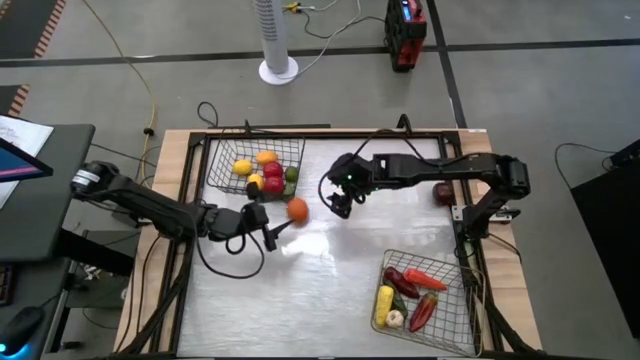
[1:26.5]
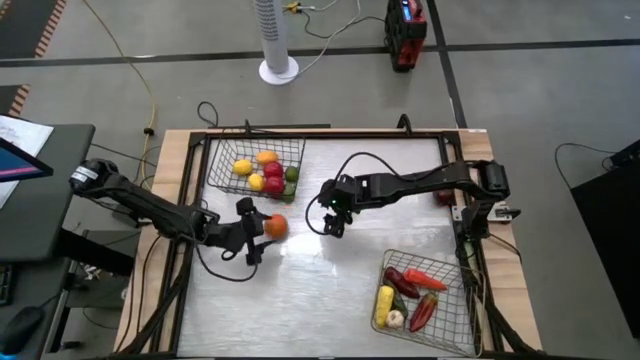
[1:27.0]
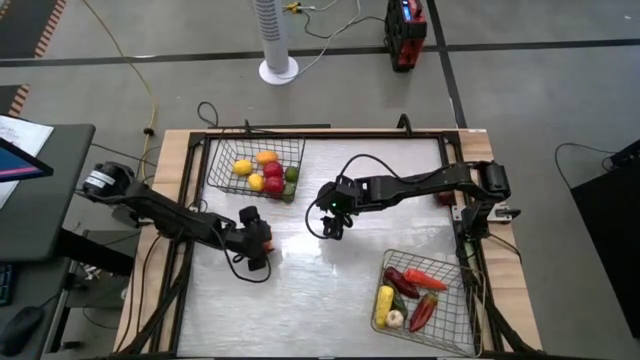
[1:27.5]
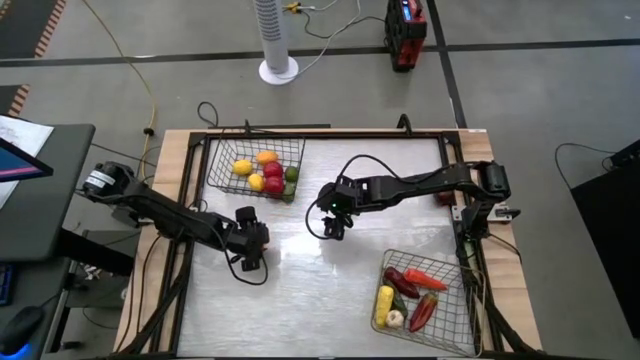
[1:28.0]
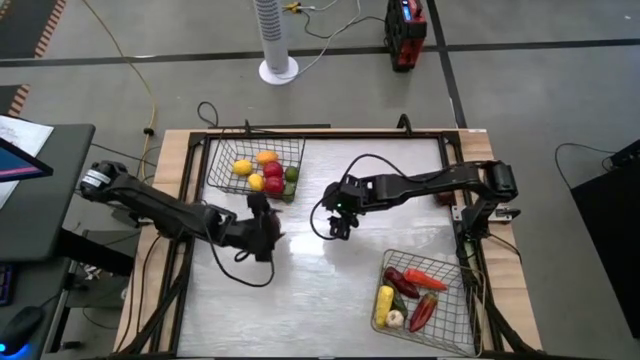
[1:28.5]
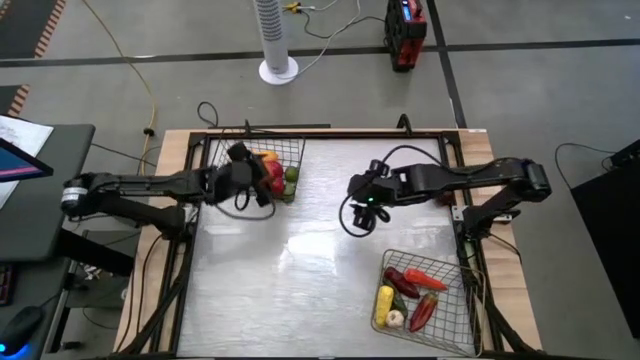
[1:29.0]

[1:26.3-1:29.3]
Task: Sort produce into baskets
Put the orange into the black wire basket

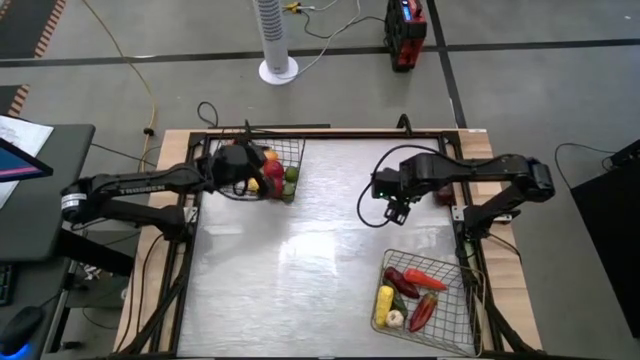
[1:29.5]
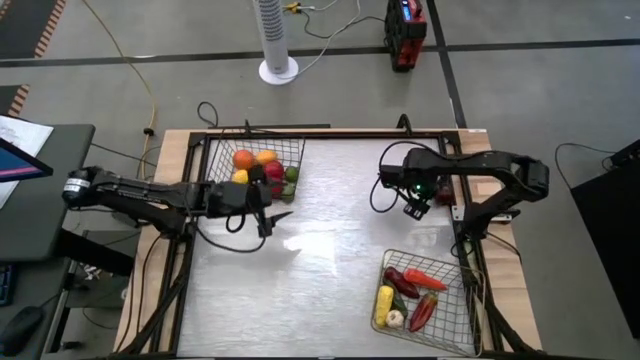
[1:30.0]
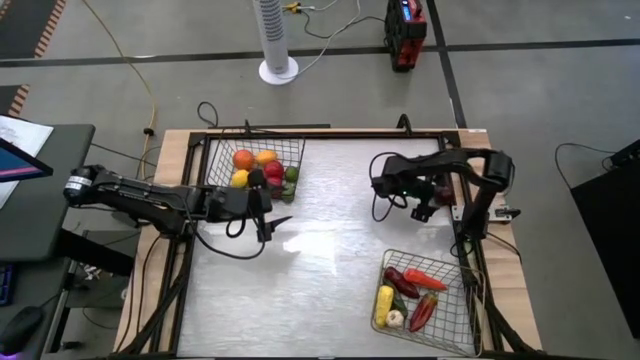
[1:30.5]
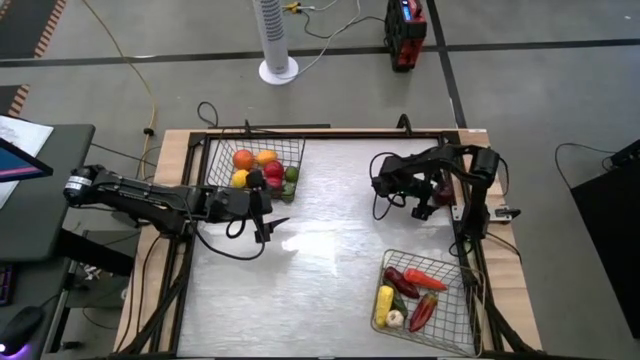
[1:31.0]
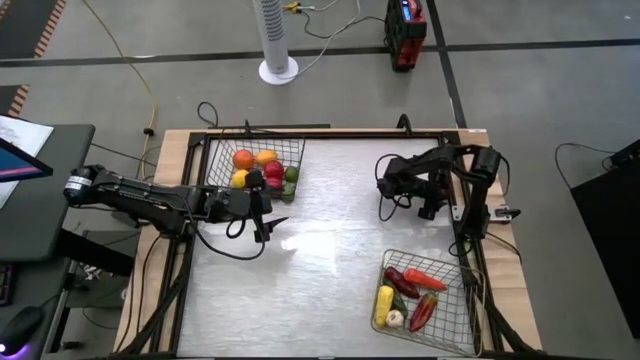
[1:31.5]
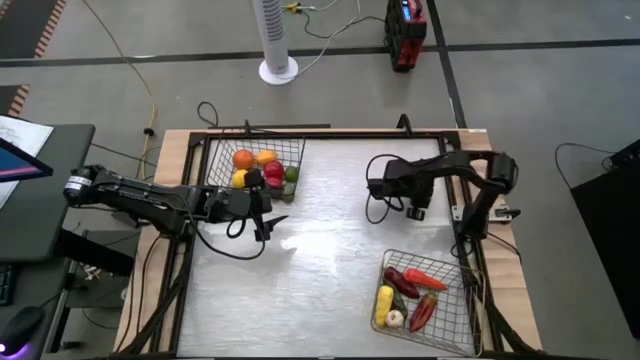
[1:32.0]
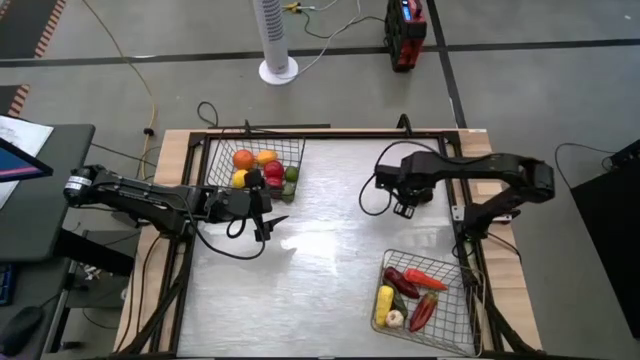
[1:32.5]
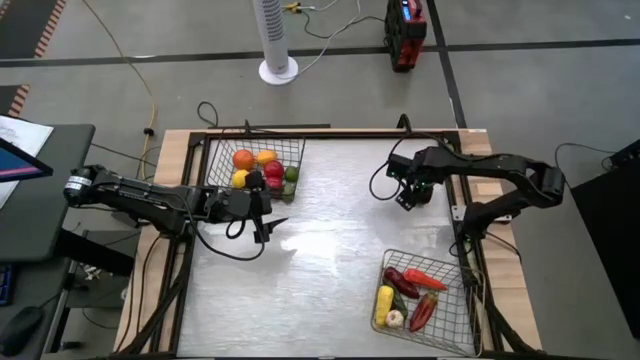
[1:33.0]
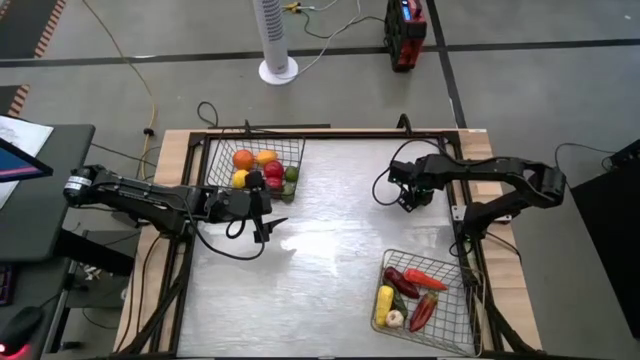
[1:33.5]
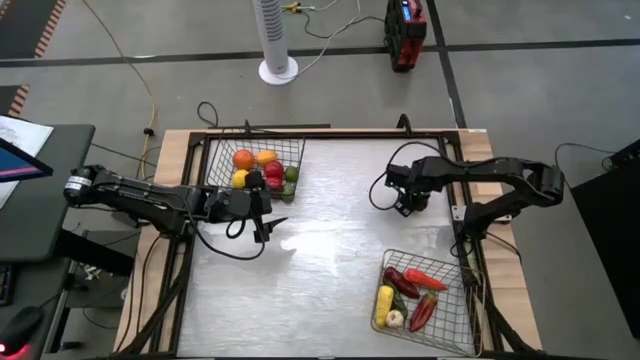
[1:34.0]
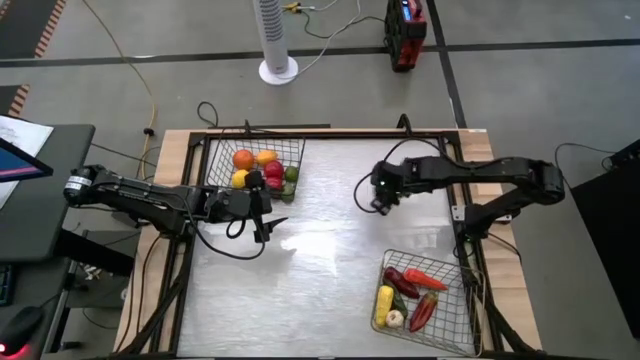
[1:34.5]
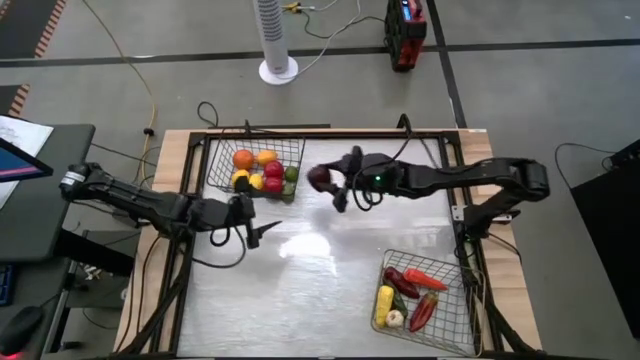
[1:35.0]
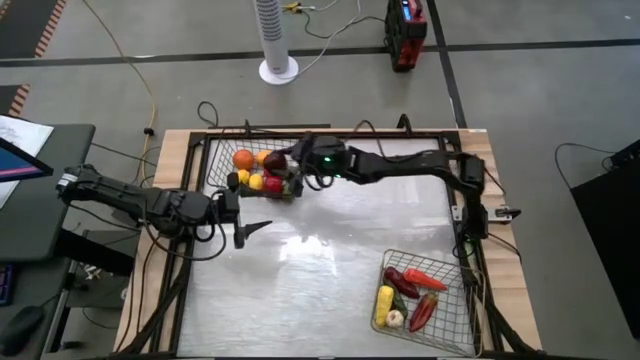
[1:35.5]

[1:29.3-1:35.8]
Put the red apple into the black wire basket

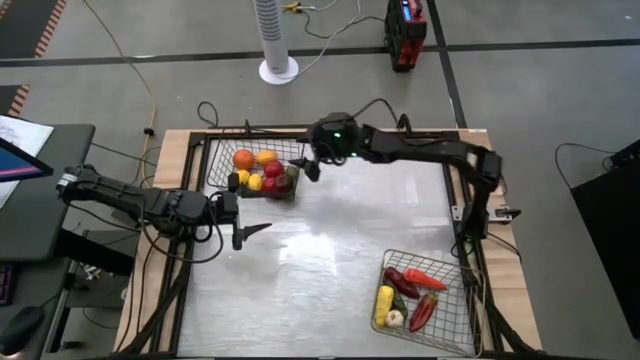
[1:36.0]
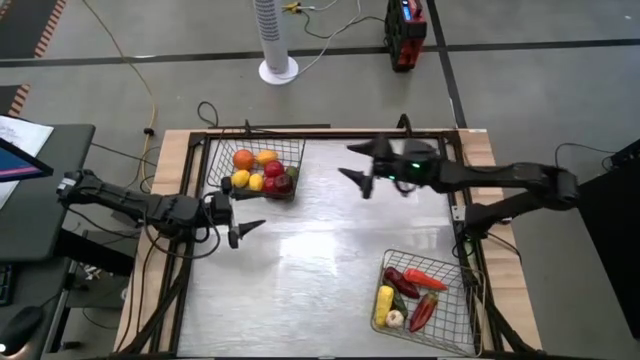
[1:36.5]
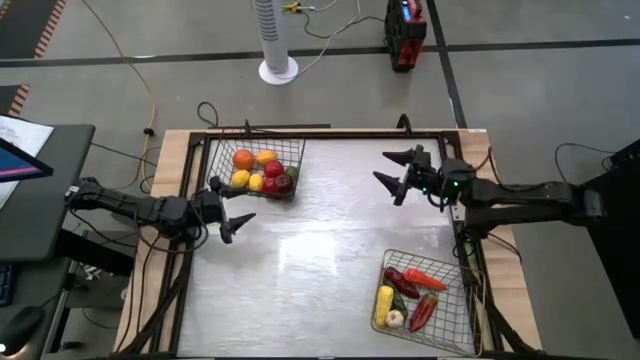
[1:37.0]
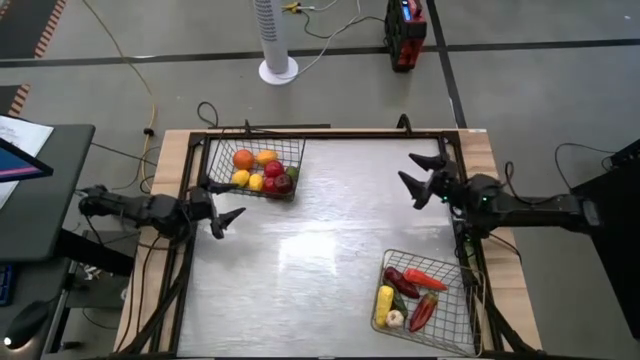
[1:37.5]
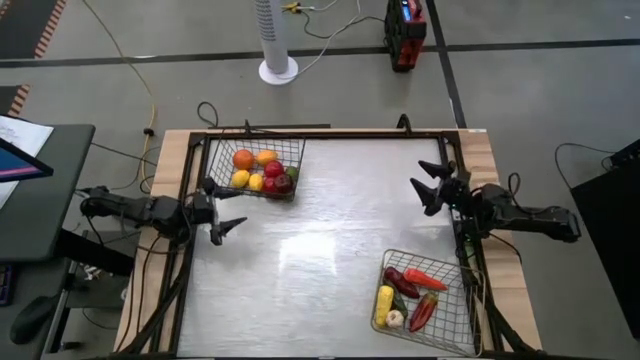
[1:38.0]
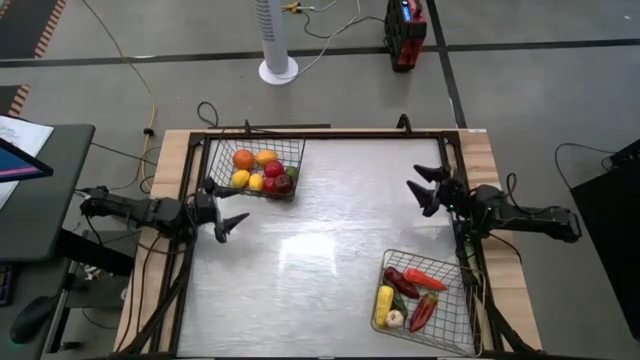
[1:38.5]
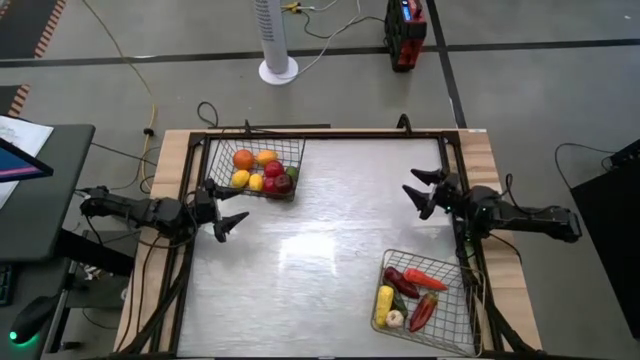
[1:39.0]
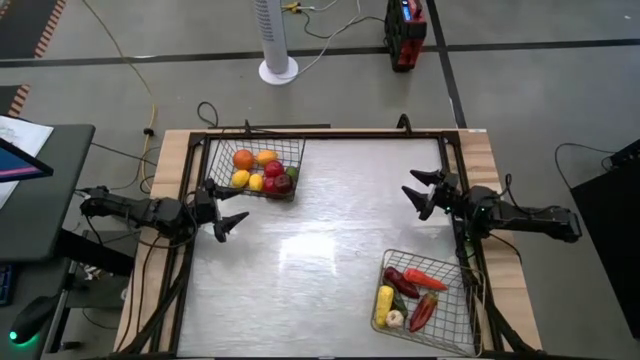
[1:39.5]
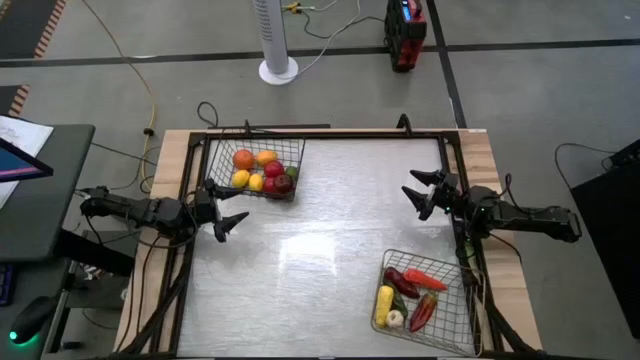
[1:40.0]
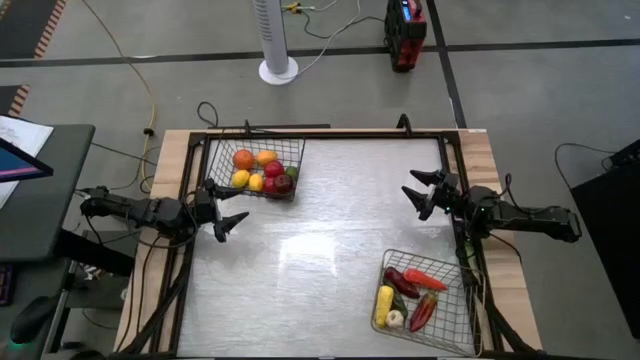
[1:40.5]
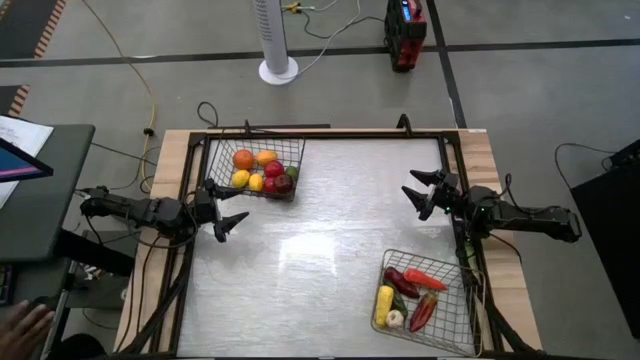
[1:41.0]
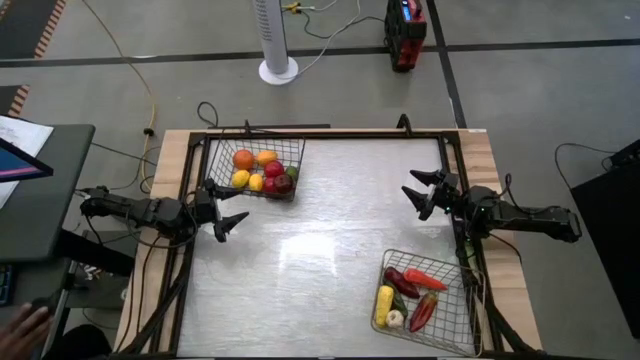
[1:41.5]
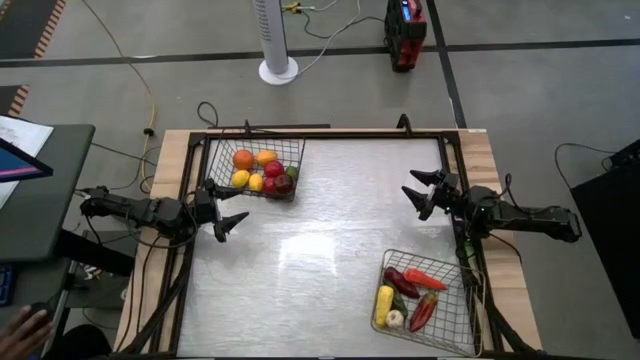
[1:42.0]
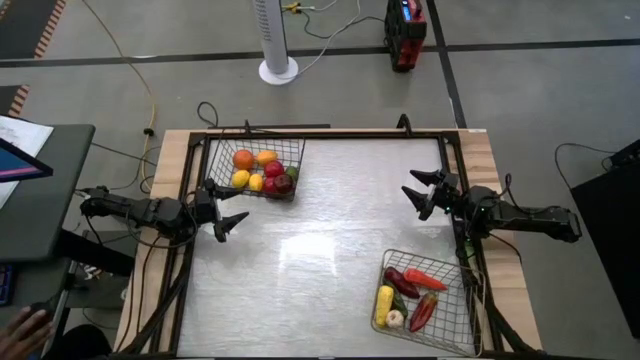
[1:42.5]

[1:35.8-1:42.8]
Return to Home Position

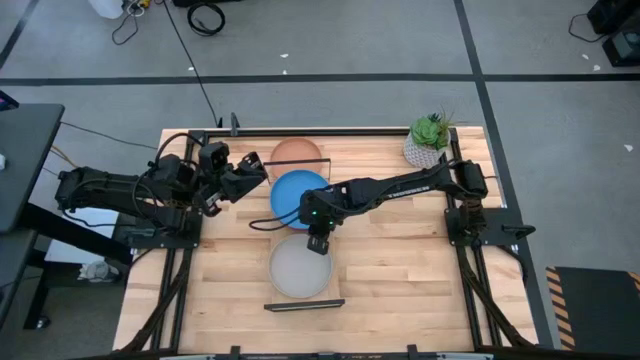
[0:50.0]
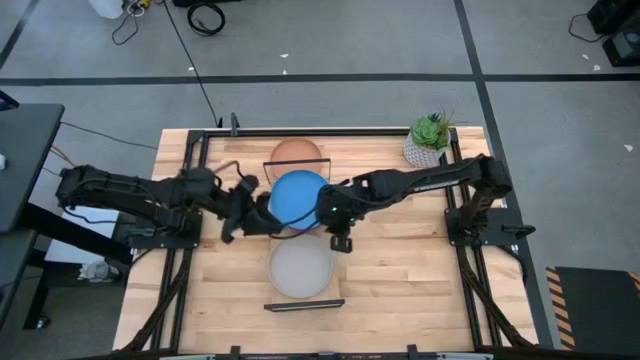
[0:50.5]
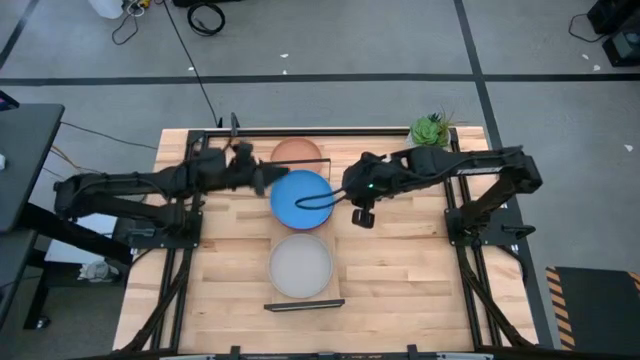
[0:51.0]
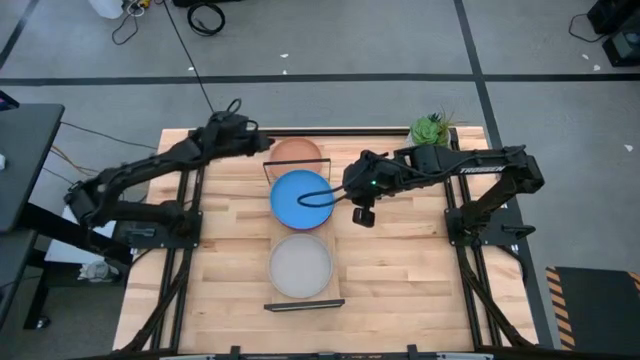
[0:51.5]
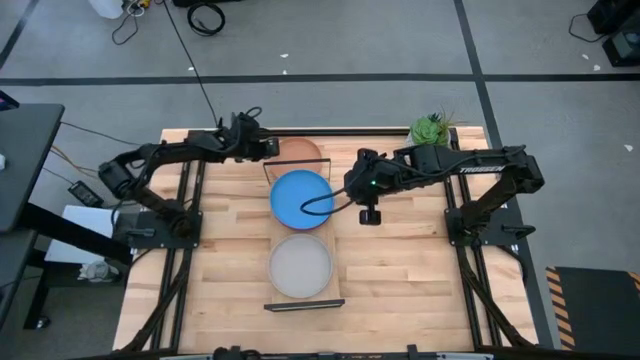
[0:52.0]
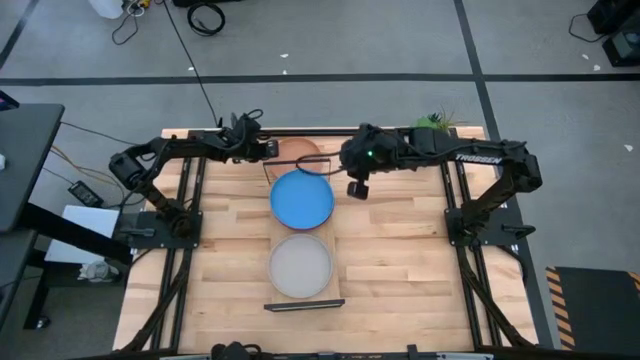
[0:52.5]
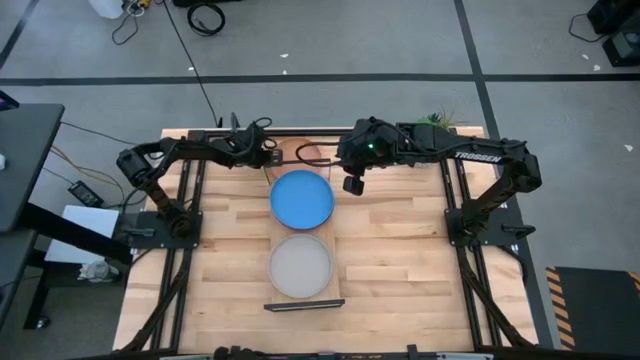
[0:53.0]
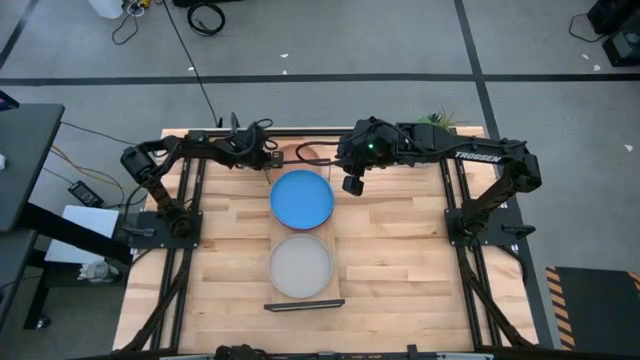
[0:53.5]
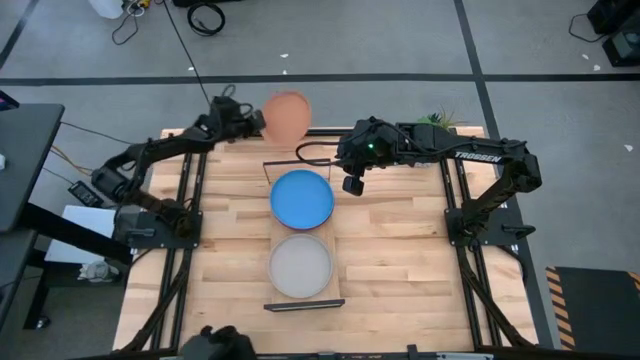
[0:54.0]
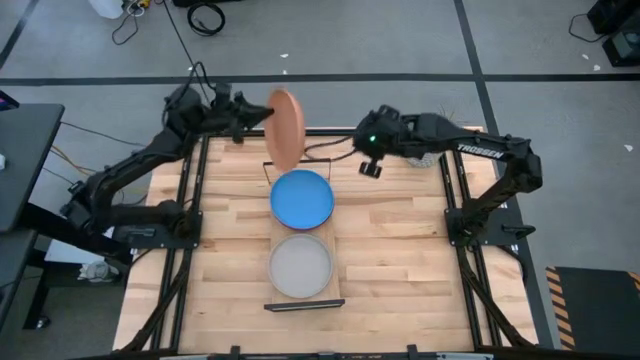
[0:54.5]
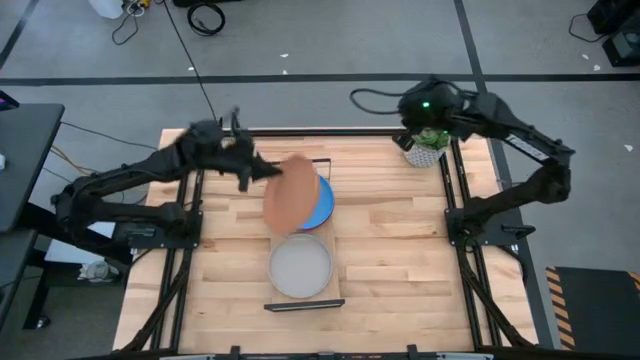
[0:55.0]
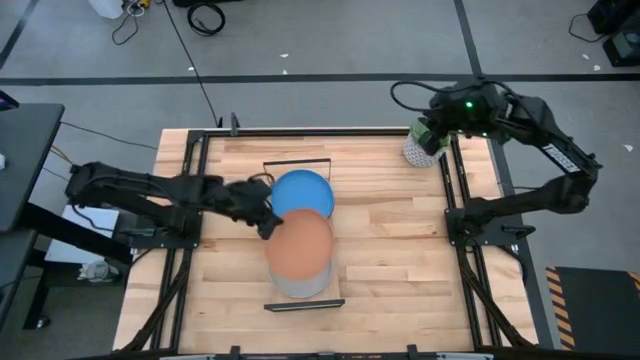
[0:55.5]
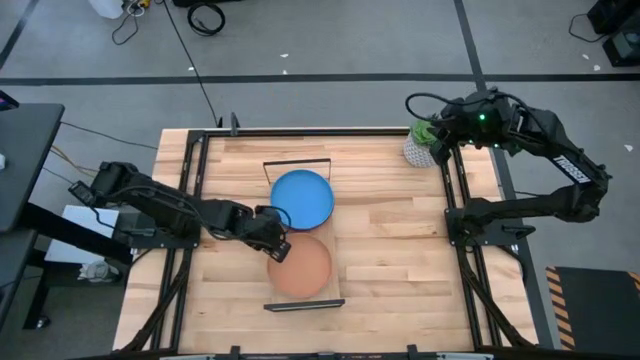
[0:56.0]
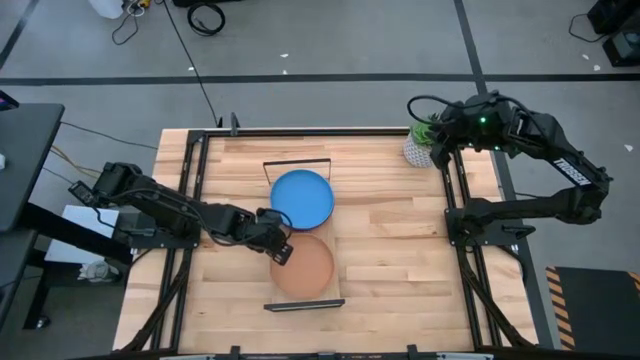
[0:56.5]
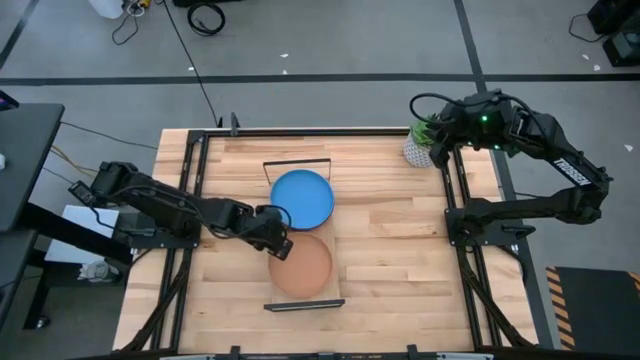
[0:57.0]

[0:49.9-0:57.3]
Task: Place and stack plates onto a shelf
Stack the brown plate on top of the gray plate on the shelf
